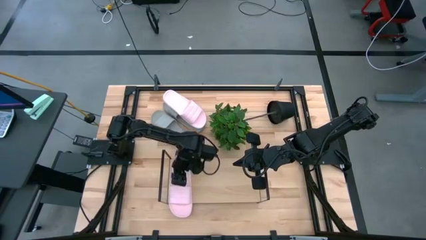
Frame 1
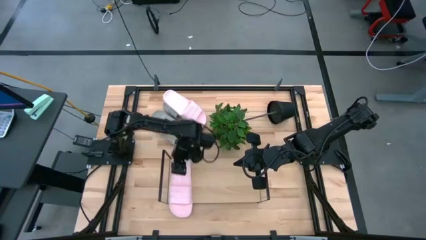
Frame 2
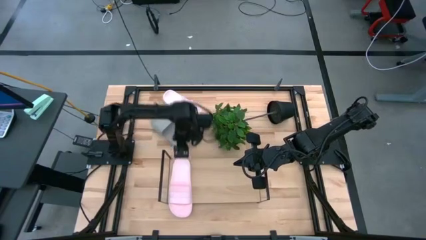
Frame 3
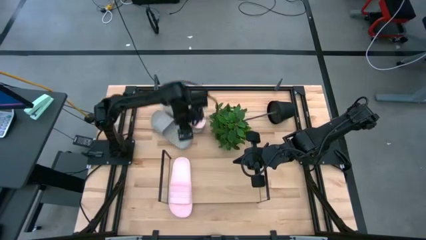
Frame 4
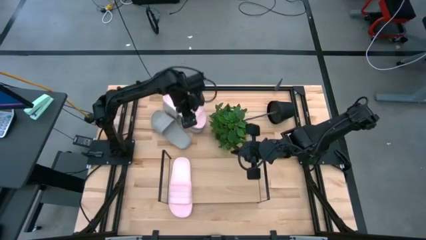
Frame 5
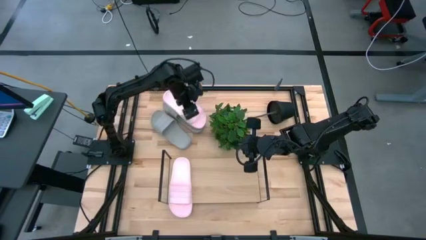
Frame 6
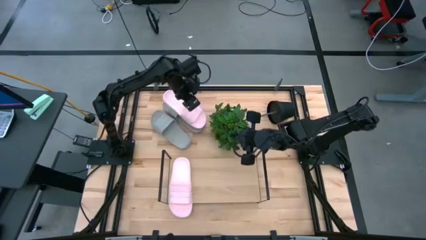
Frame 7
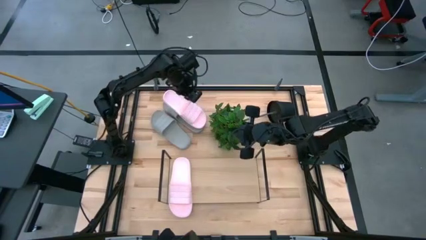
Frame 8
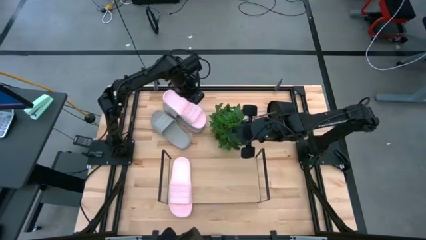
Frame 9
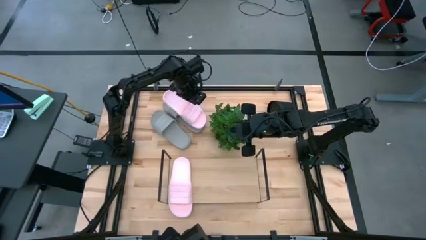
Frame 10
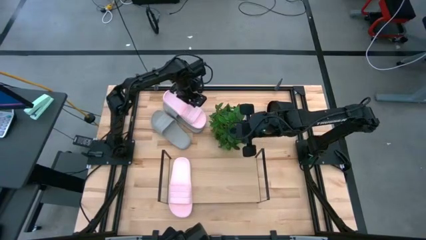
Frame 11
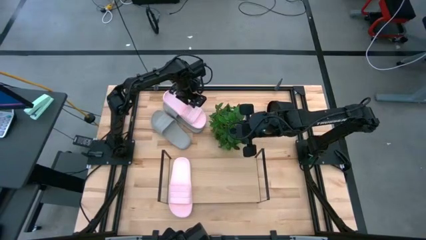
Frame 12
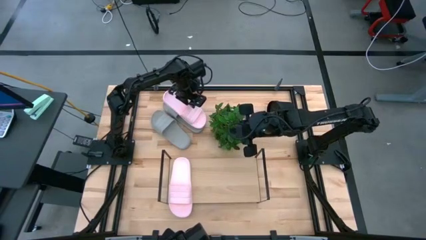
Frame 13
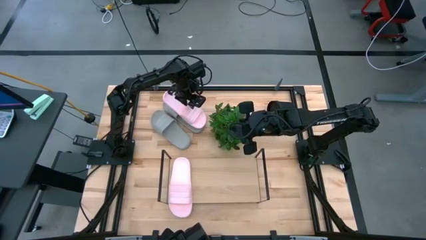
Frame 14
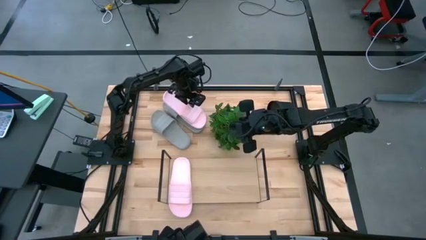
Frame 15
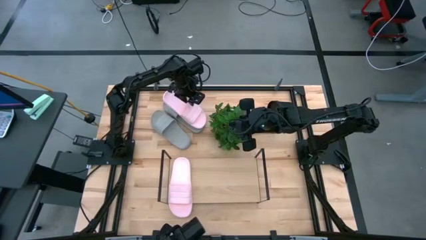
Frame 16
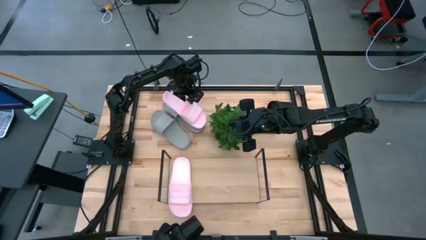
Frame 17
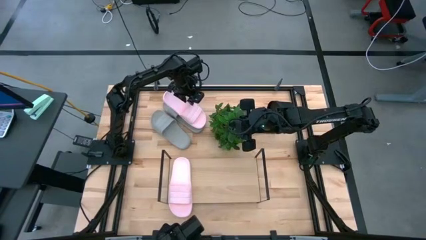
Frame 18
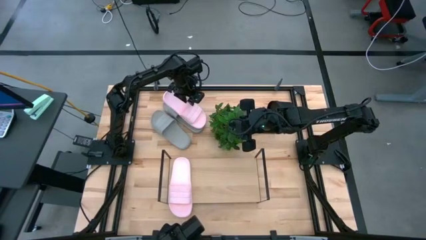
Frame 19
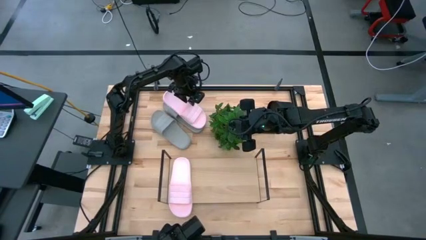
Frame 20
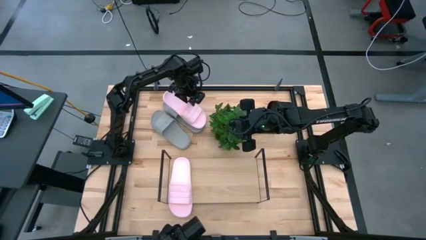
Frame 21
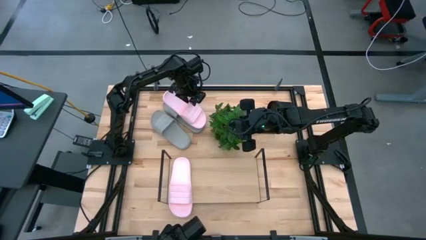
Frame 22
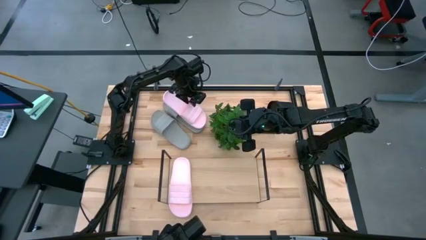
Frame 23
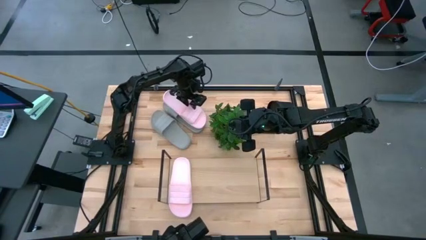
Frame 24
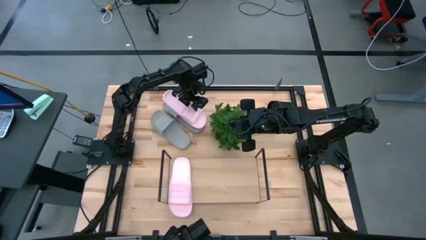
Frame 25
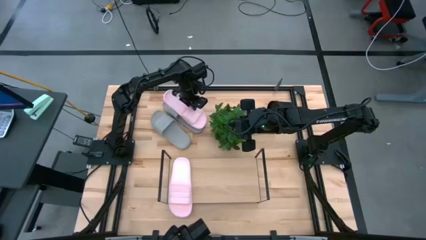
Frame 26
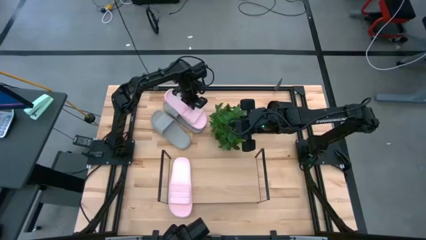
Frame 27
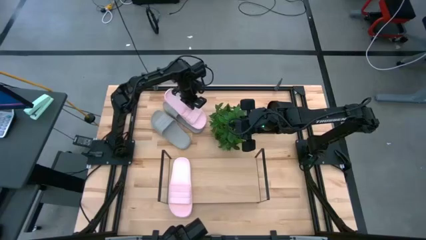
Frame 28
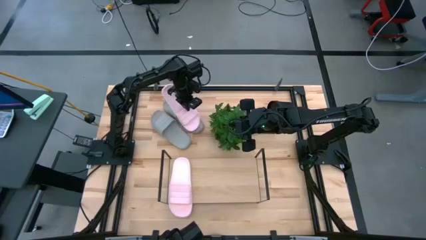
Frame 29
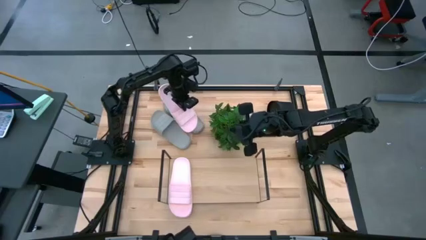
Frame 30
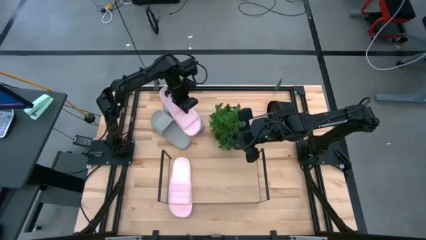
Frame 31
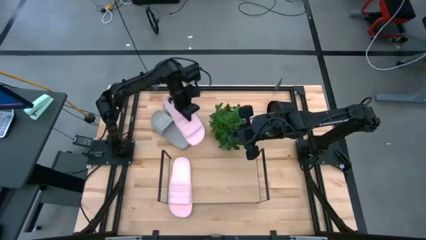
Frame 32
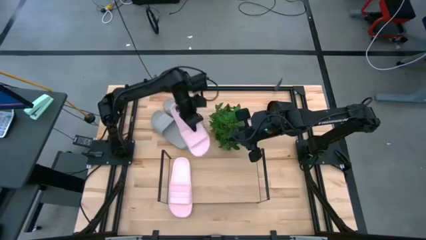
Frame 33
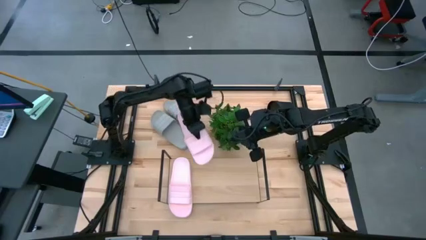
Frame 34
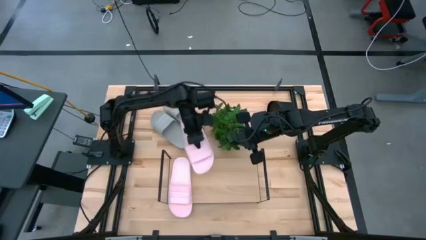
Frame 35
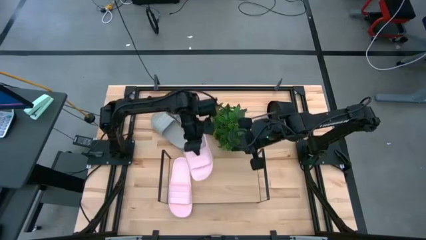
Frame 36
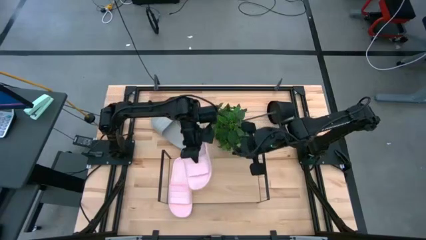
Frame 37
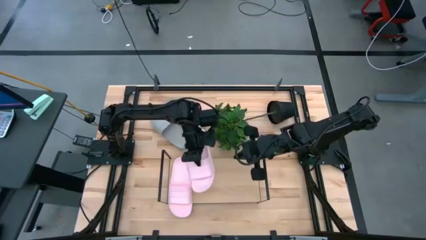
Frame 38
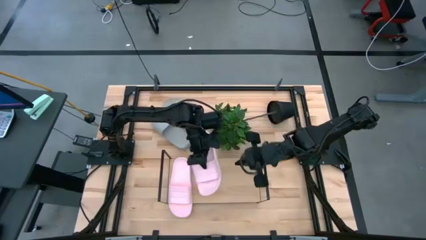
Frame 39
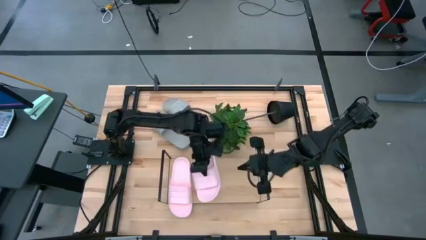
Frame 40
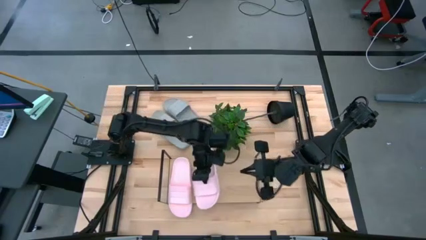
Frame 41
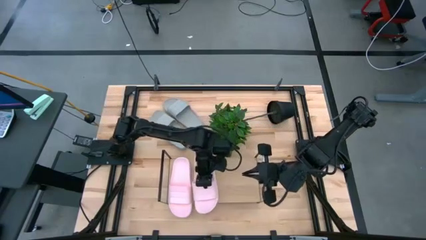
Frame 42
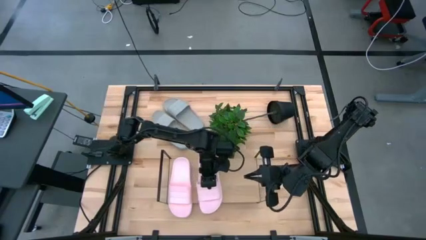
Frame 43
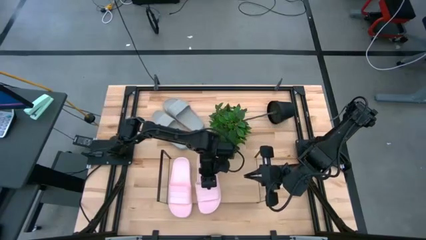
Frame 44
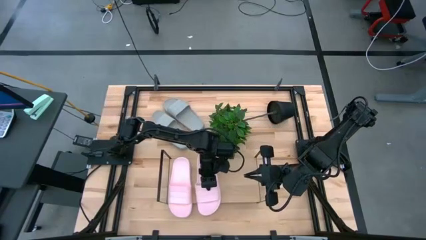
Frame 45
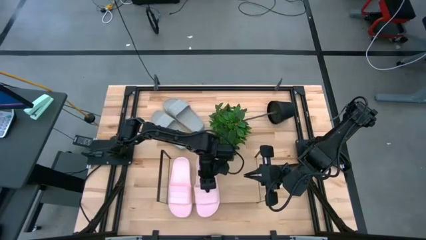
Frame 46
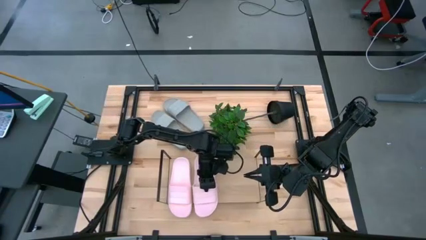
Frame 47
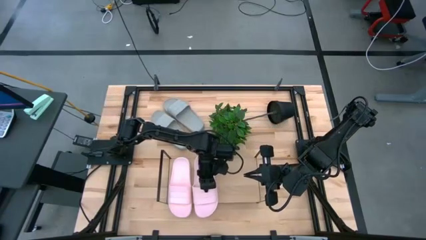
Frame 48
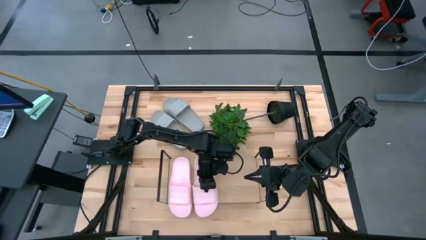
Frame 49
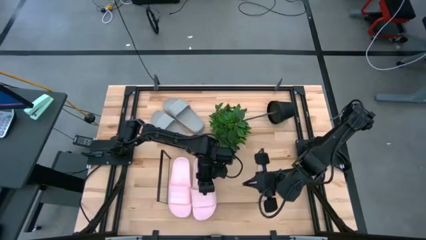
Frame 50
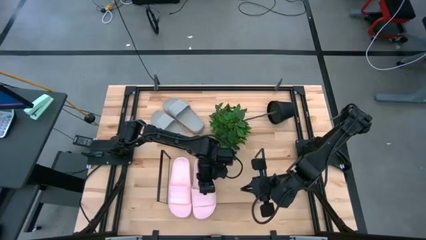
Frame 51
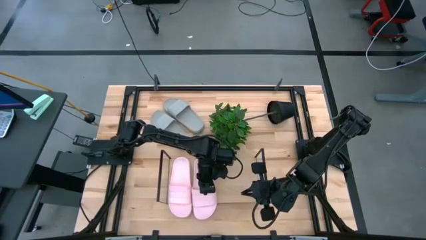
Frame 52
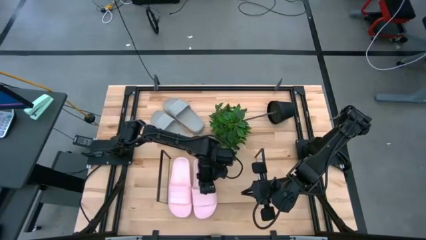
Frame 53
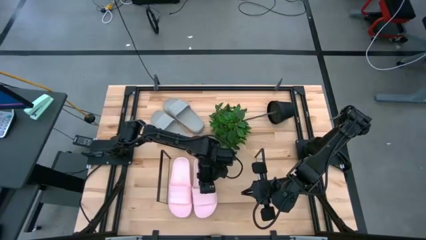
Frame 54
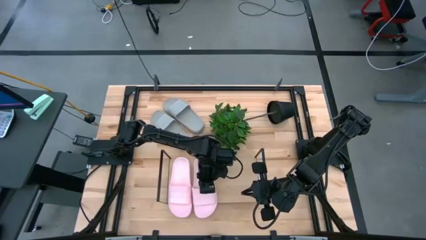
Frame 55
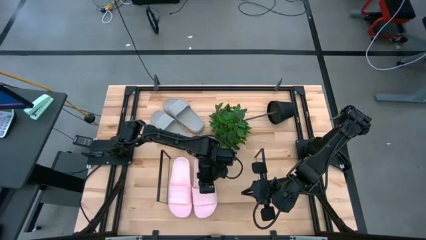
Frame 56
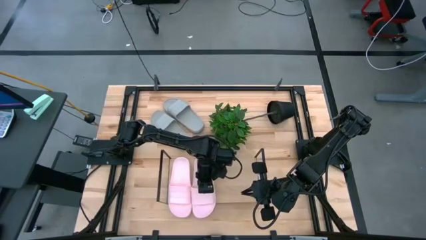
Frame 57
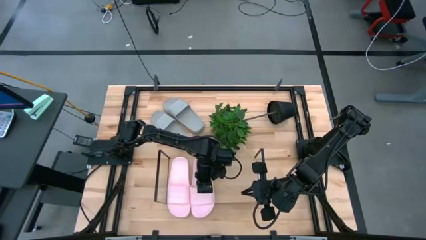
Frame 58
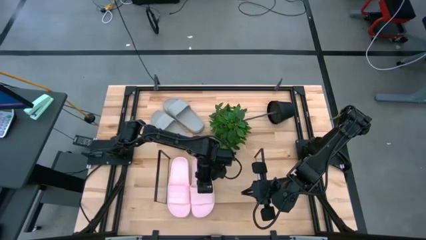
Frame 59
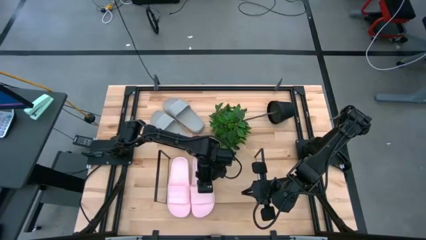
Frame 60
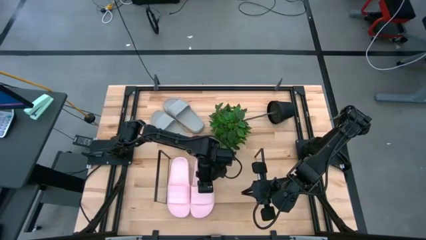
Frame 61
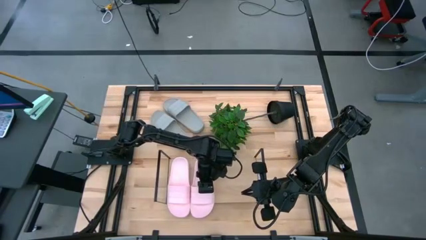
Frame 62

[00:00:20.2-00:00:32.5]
Task: Pick and place slides into the shelf
Put the pink slipper on the shelf
